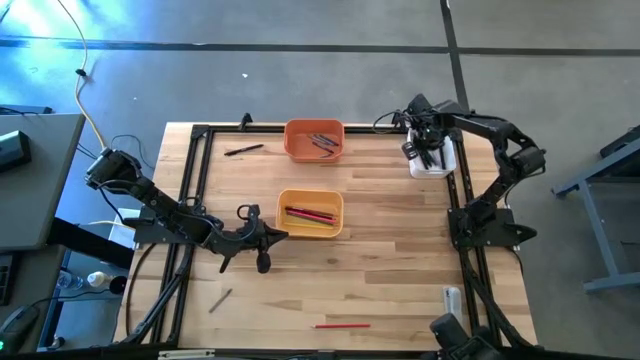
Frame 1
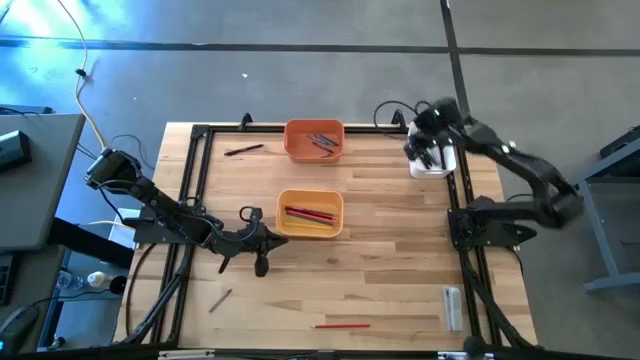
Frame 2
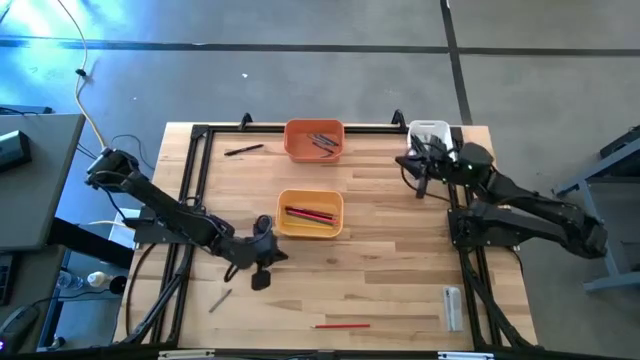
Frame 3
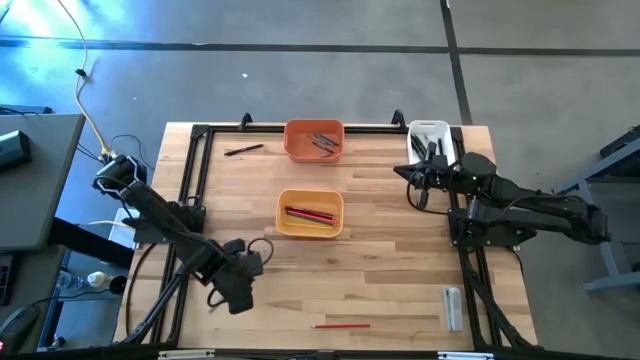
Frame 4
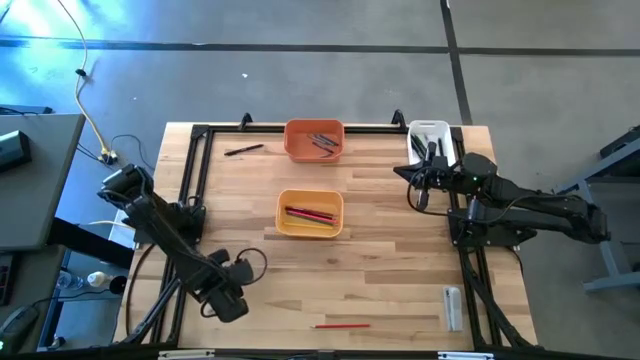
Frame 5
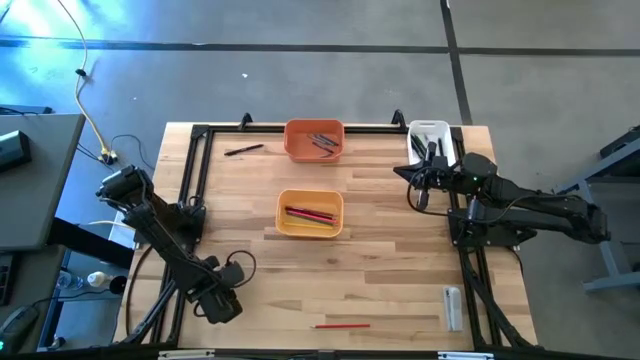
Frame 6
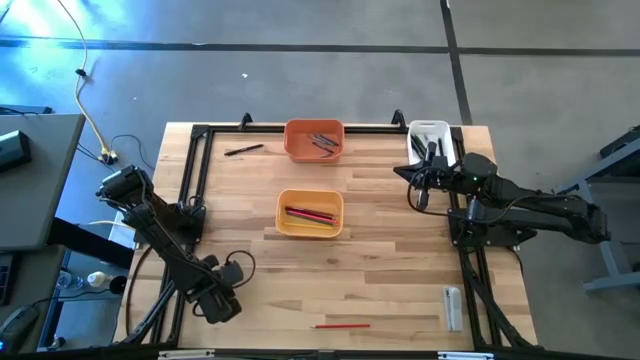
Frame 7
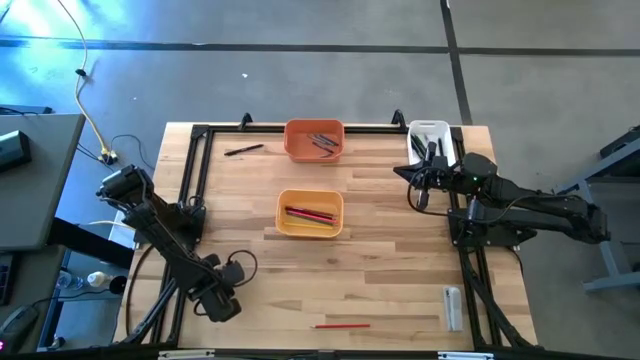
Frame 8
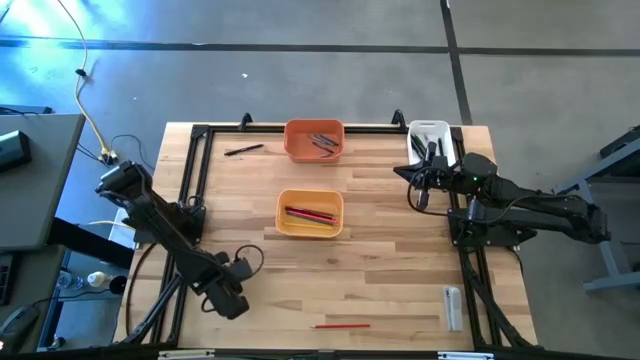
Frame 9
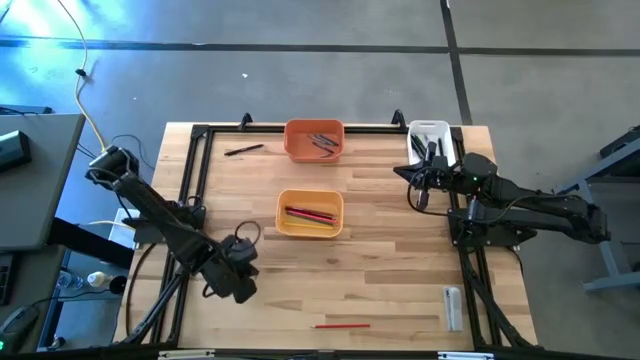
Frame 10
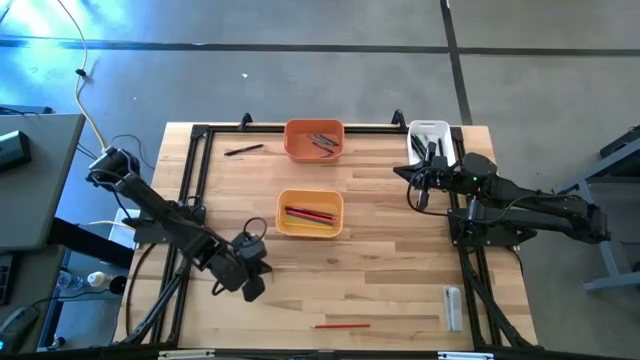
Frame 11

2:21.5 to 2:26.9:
Task: Sort crayons/erasers/pens/pencils in bins
Put the gray crayon into the orange bin

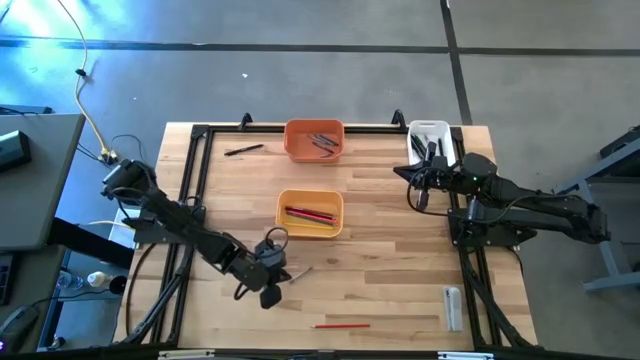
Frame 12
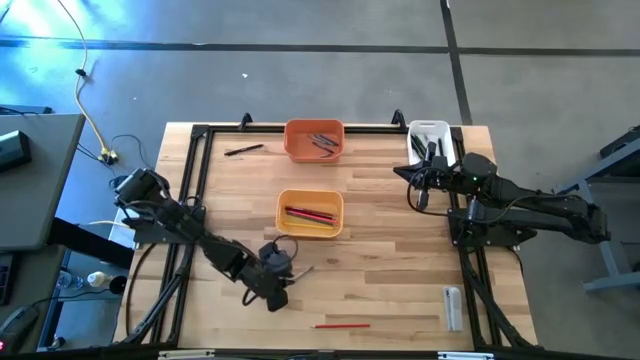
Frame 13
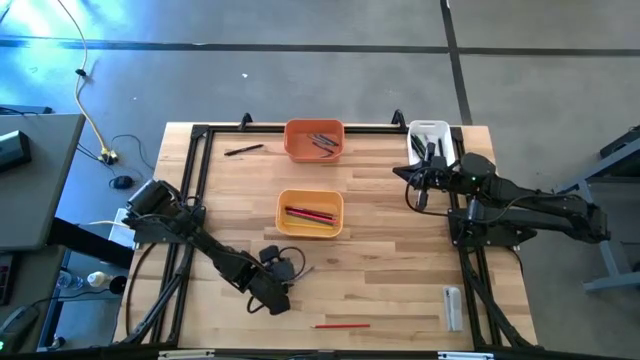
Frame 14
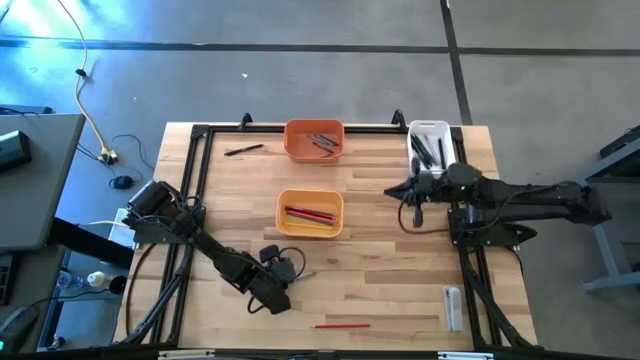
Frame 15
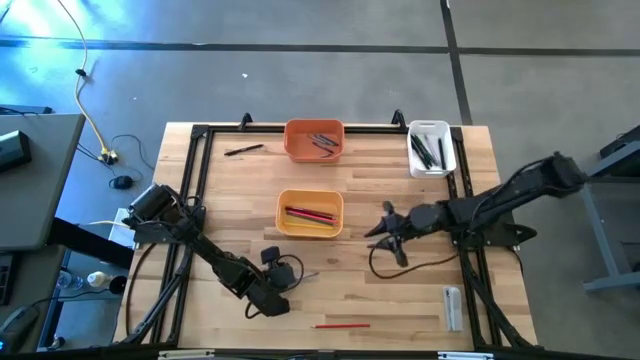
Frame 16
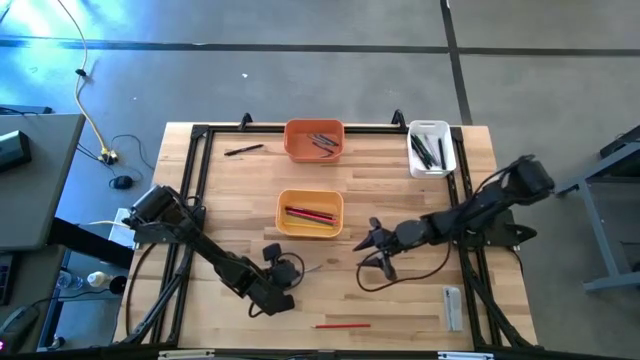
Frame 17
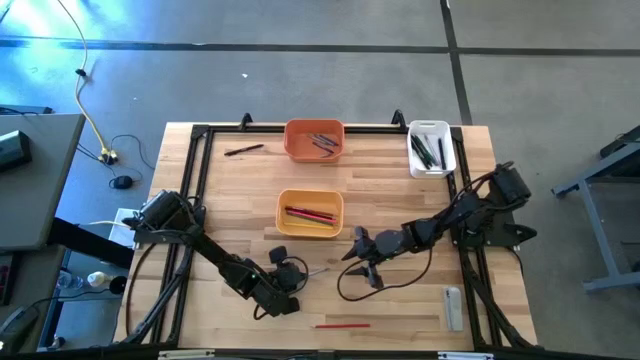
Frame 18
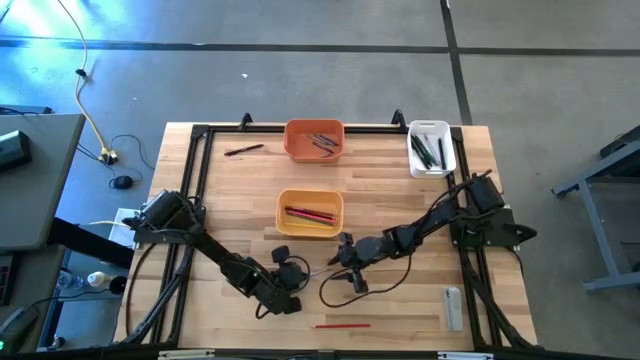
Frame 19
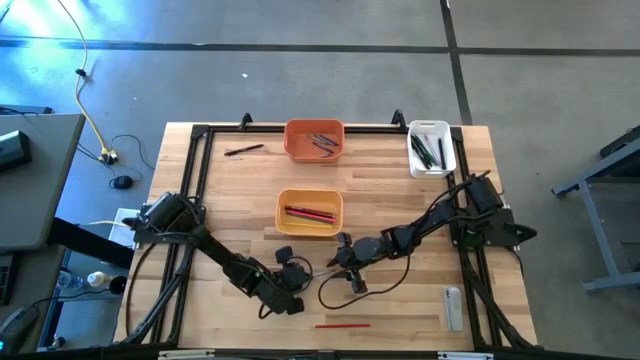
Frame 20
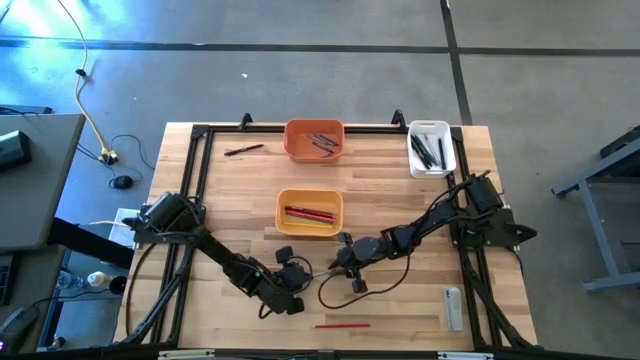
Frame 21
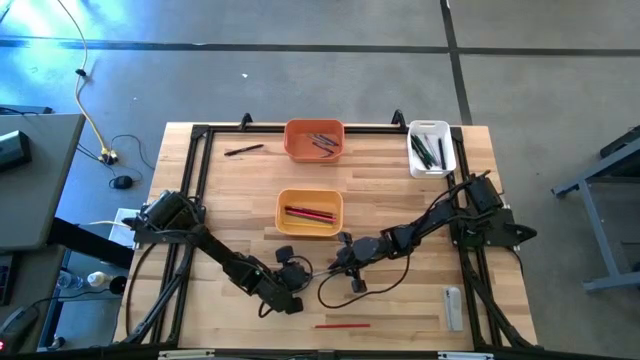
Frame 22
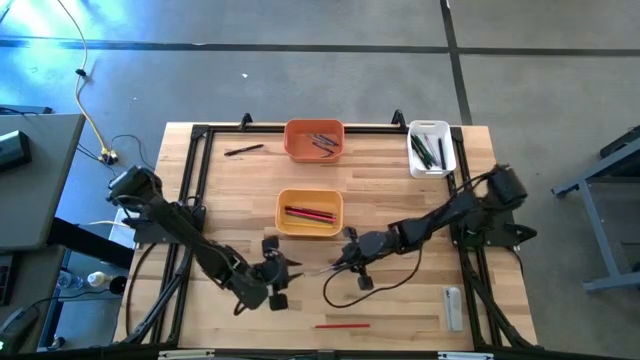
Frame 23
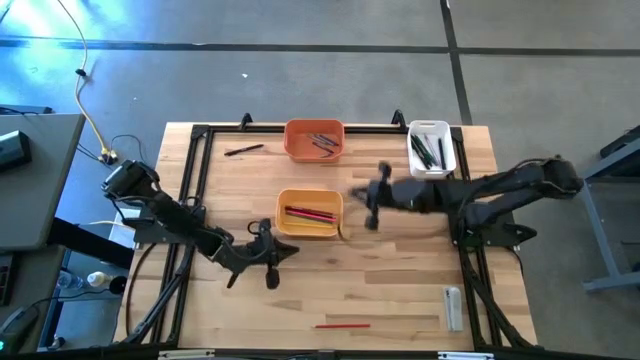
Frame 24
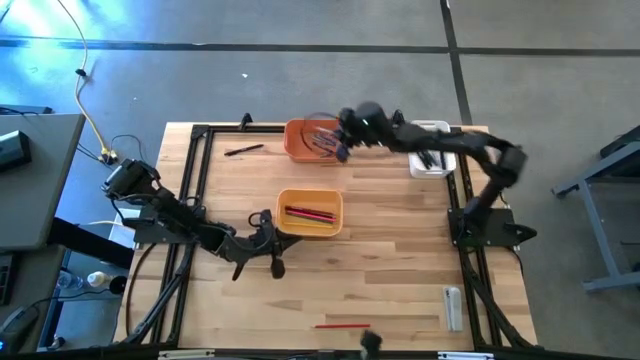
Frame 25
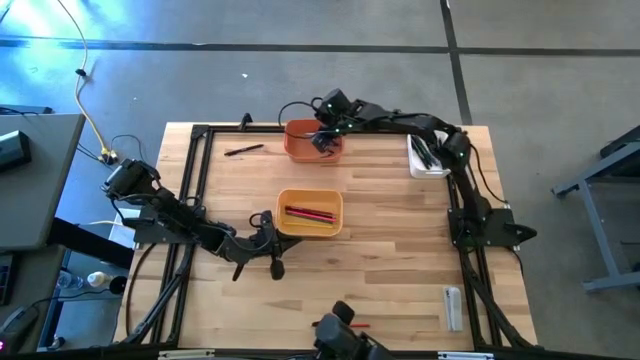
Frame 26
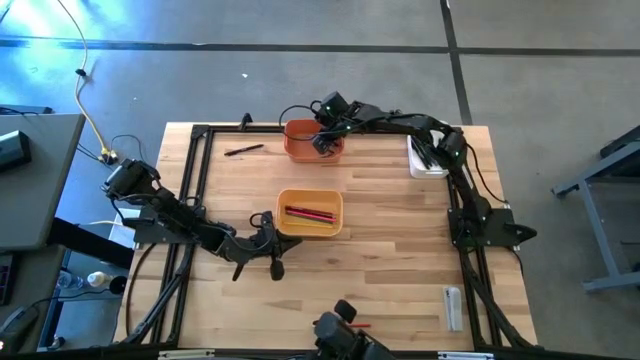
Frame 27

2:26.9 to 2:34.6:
Put the gray crayon into the orange bin

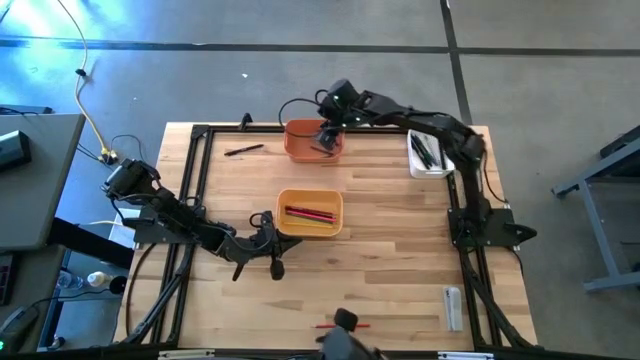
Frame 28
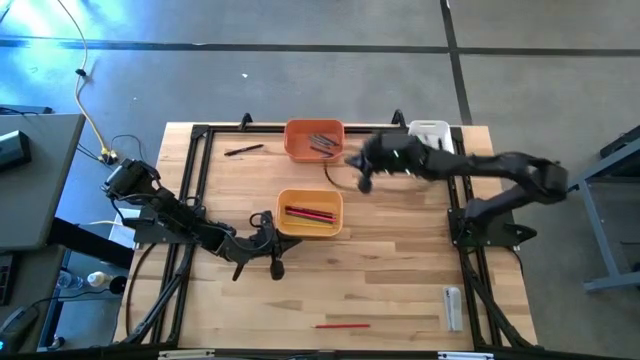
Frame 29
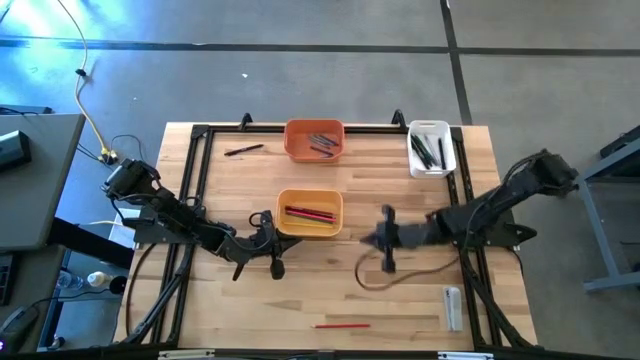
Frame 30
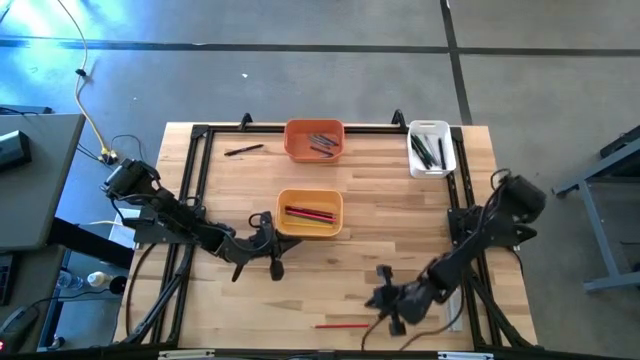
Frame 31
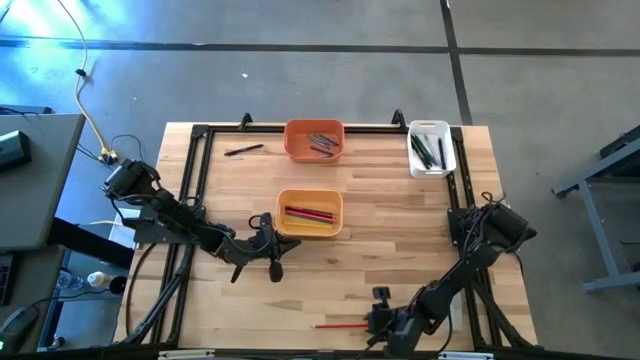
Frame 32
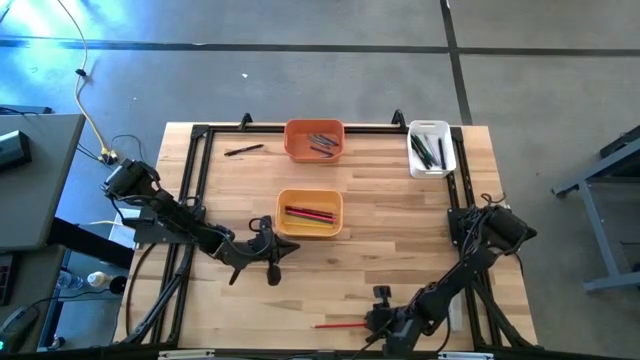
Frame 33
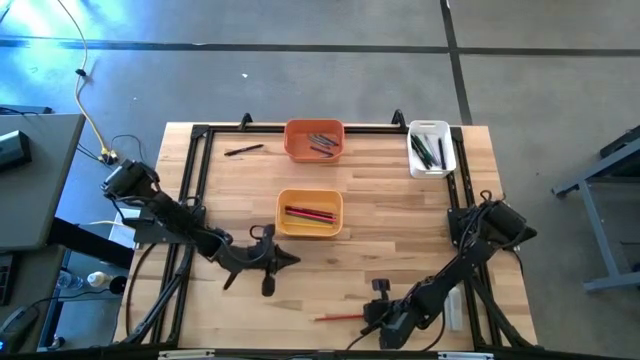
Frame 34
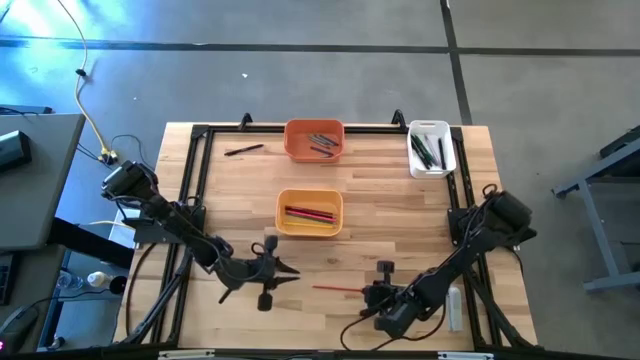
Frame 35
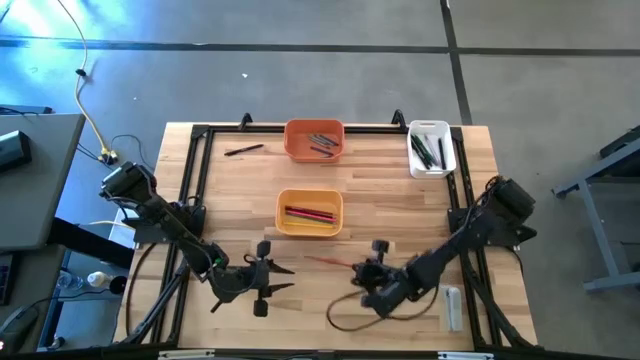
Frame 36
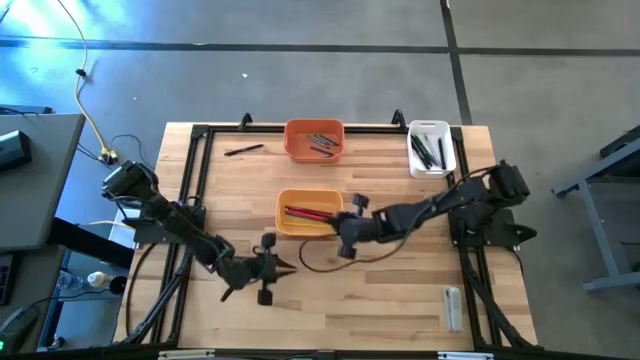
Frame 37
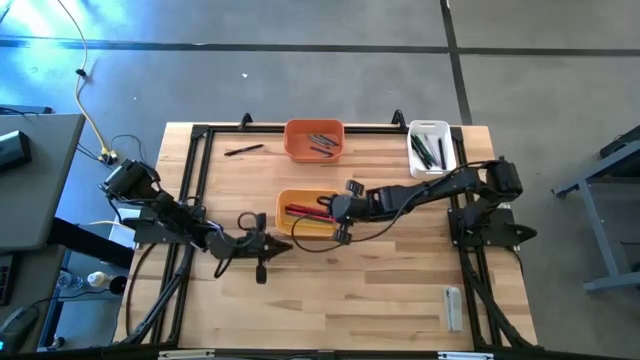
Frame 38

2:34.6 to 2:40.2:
Put the red pencil into the yellow bin
